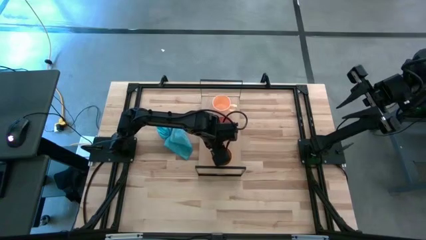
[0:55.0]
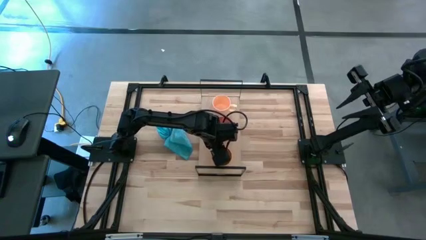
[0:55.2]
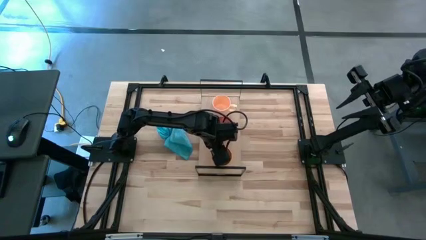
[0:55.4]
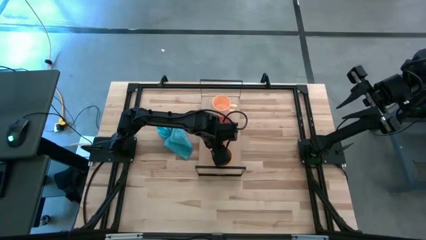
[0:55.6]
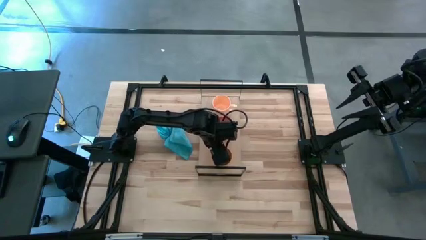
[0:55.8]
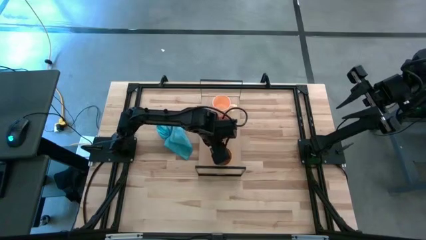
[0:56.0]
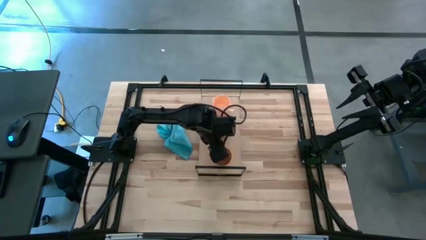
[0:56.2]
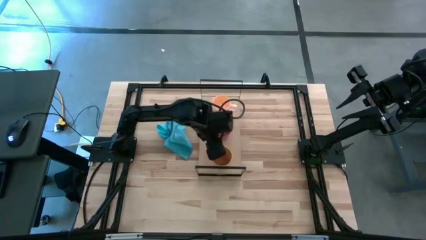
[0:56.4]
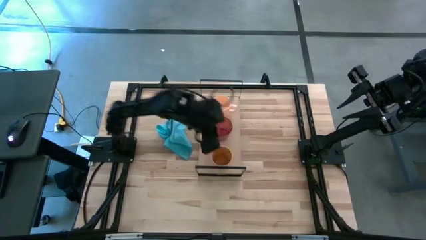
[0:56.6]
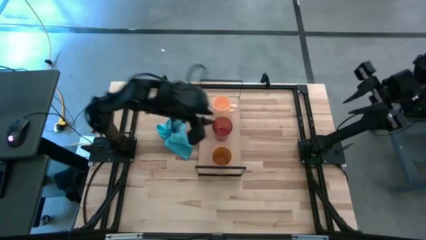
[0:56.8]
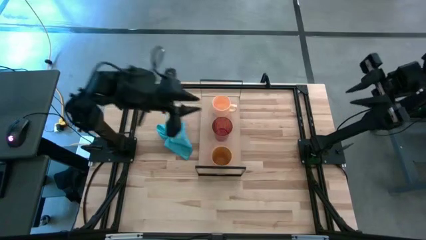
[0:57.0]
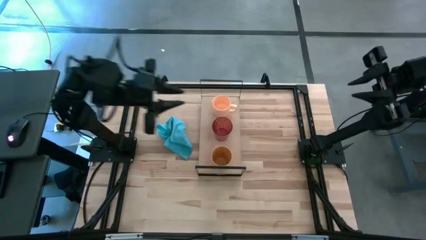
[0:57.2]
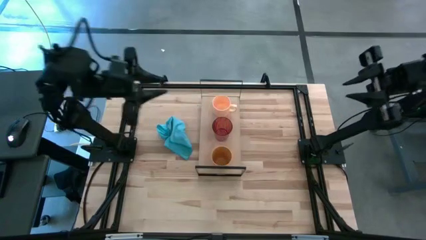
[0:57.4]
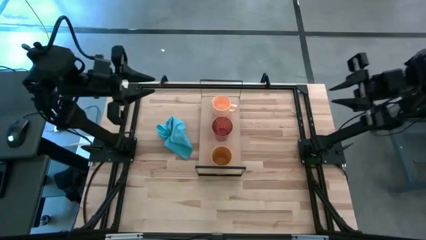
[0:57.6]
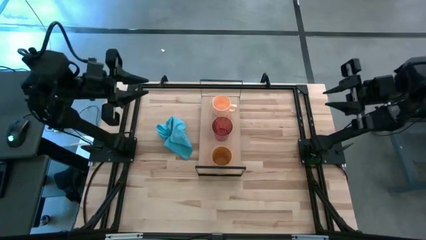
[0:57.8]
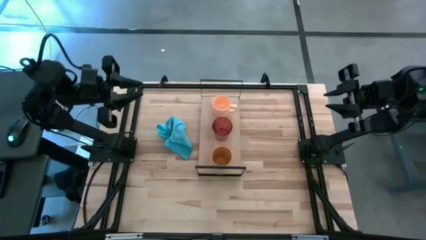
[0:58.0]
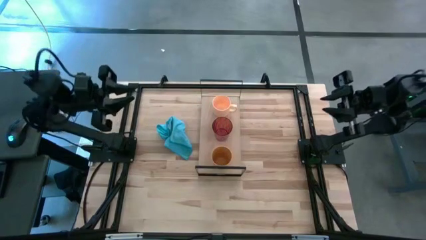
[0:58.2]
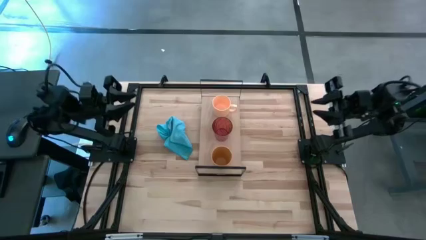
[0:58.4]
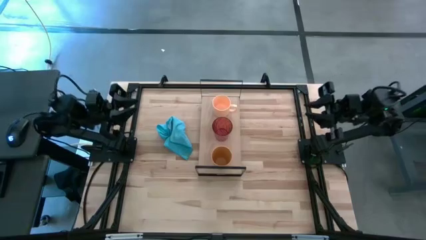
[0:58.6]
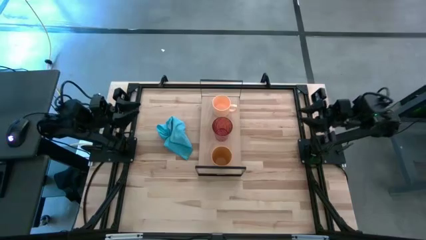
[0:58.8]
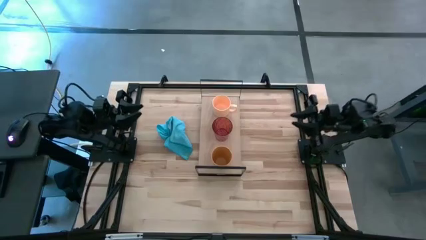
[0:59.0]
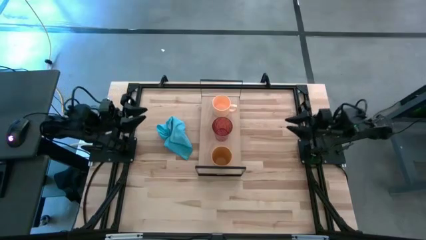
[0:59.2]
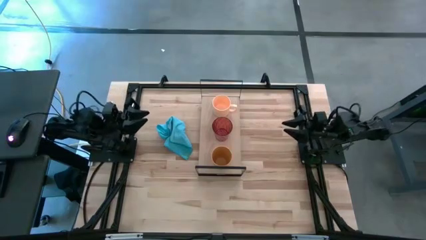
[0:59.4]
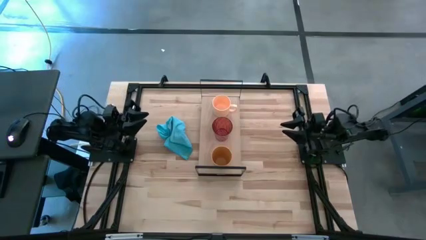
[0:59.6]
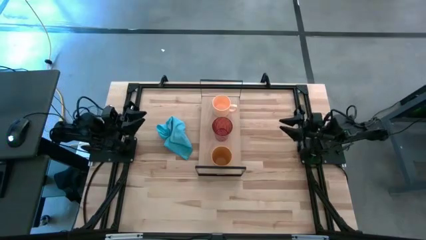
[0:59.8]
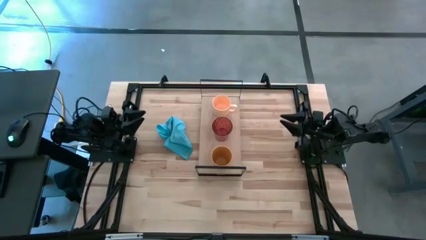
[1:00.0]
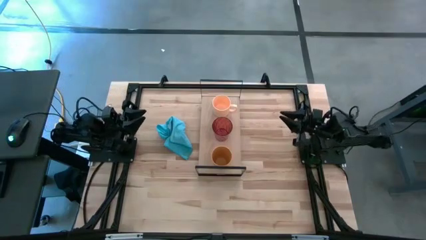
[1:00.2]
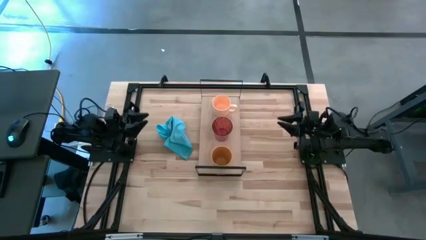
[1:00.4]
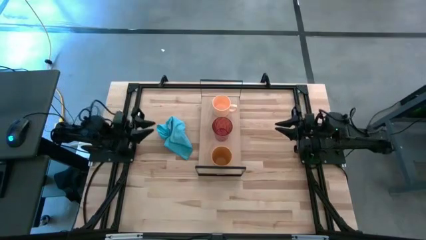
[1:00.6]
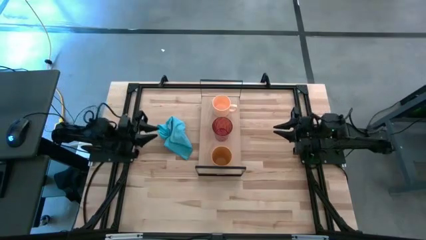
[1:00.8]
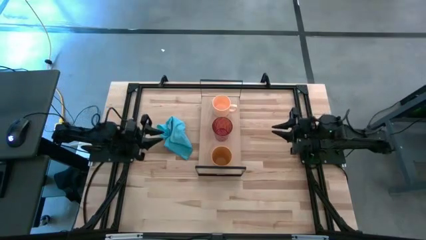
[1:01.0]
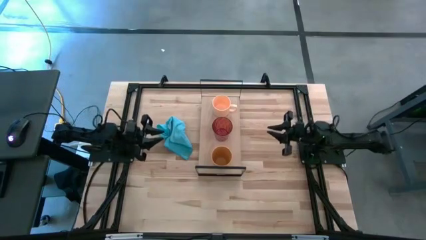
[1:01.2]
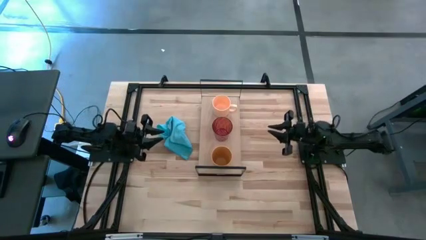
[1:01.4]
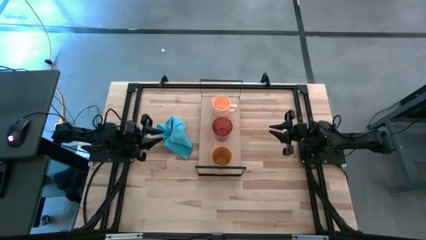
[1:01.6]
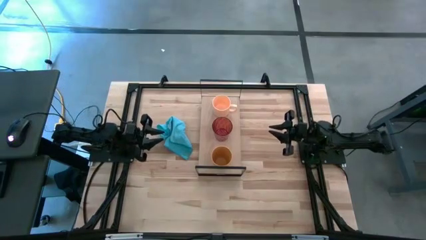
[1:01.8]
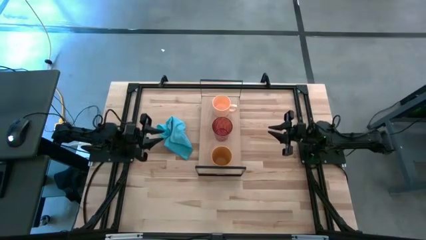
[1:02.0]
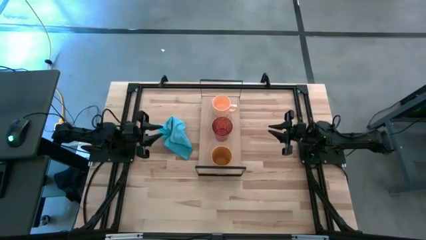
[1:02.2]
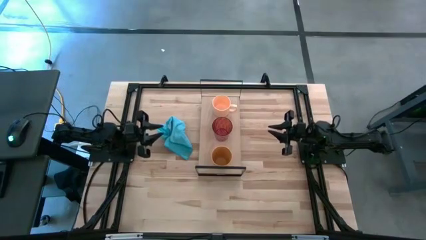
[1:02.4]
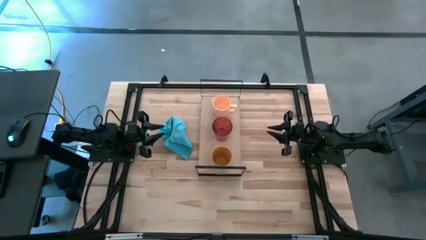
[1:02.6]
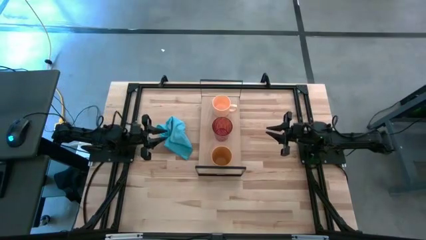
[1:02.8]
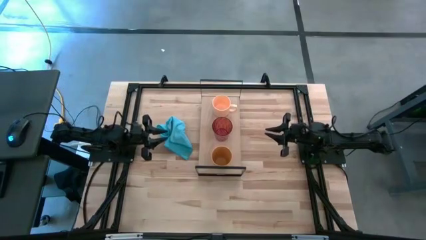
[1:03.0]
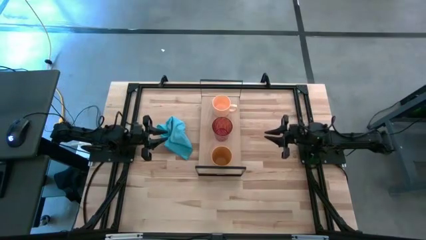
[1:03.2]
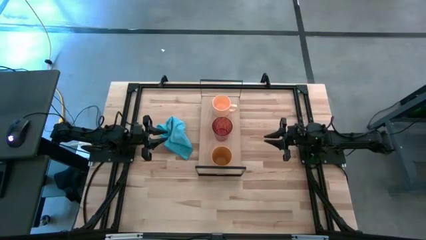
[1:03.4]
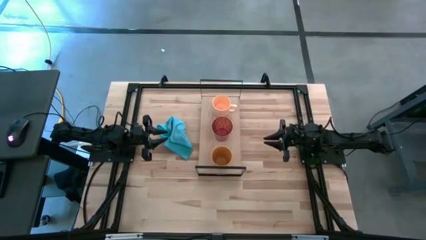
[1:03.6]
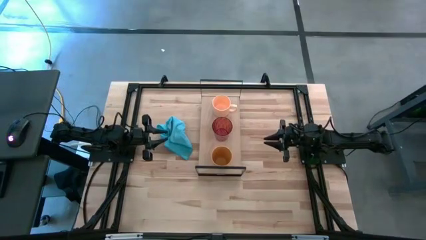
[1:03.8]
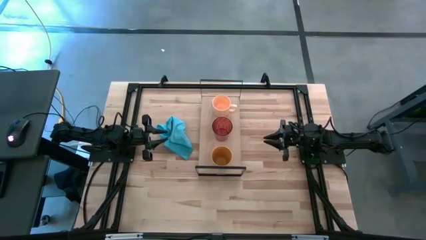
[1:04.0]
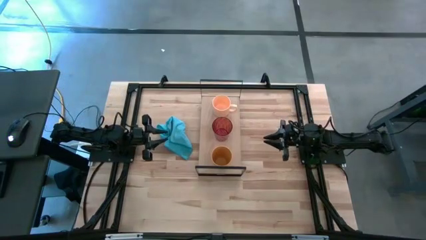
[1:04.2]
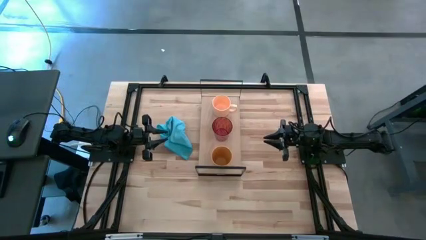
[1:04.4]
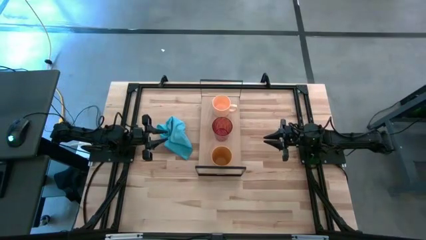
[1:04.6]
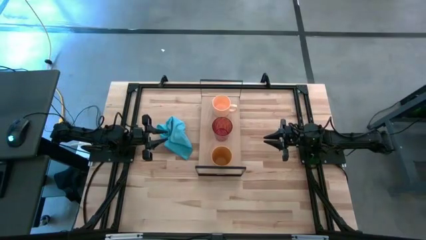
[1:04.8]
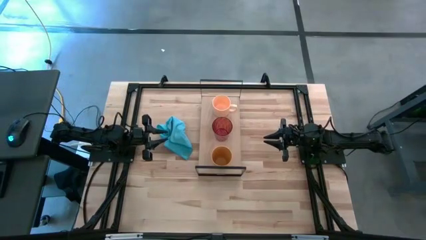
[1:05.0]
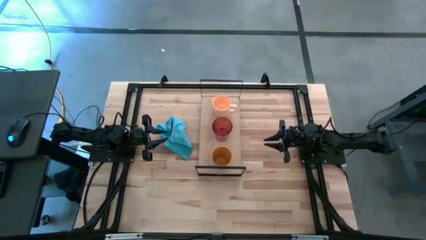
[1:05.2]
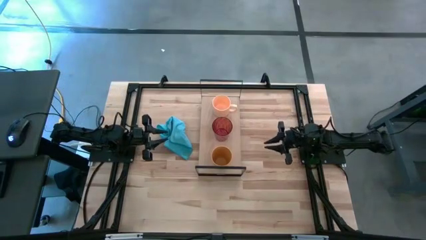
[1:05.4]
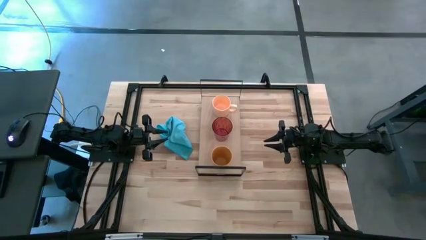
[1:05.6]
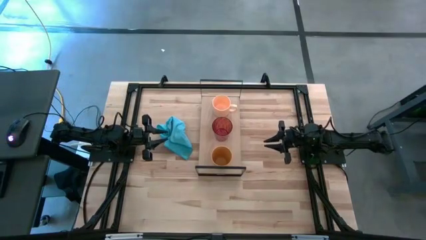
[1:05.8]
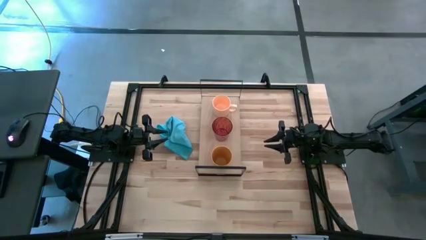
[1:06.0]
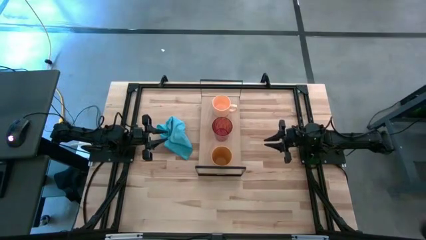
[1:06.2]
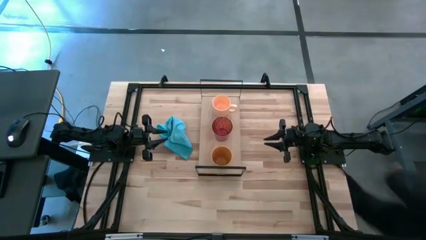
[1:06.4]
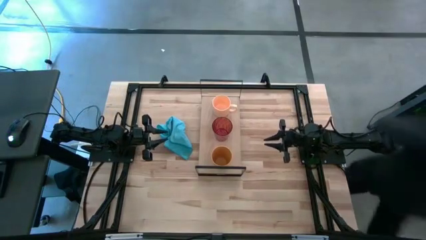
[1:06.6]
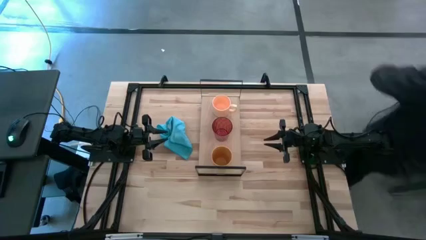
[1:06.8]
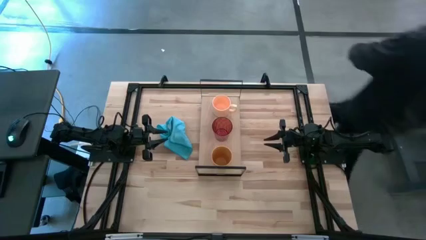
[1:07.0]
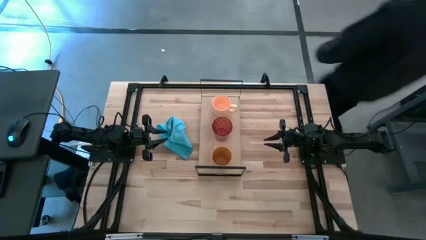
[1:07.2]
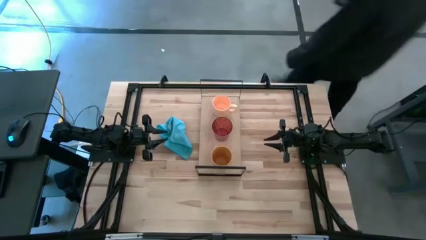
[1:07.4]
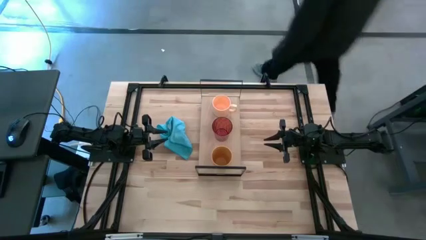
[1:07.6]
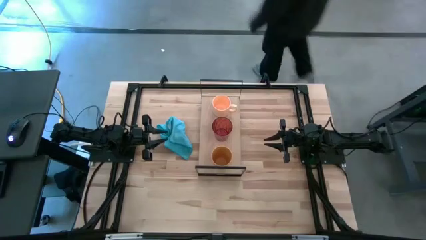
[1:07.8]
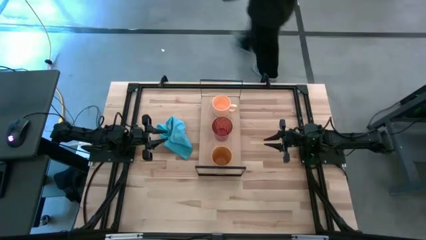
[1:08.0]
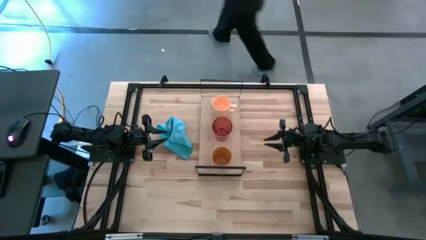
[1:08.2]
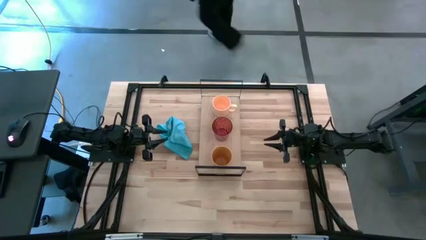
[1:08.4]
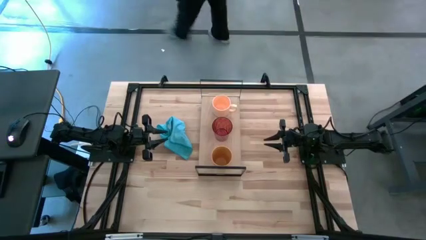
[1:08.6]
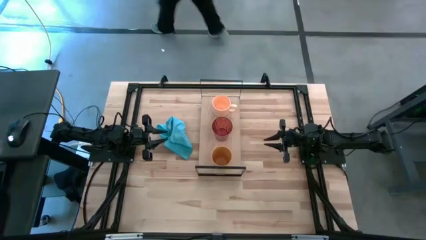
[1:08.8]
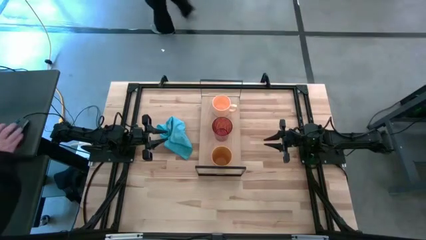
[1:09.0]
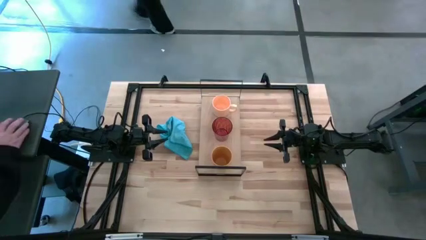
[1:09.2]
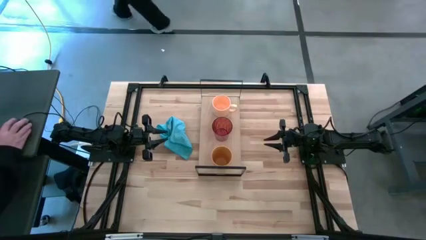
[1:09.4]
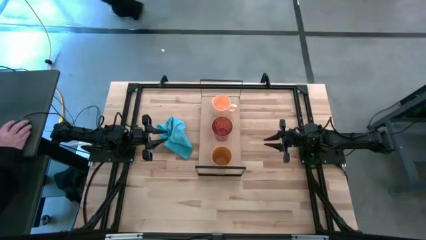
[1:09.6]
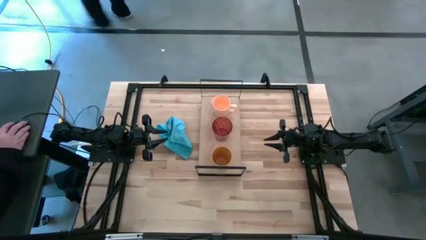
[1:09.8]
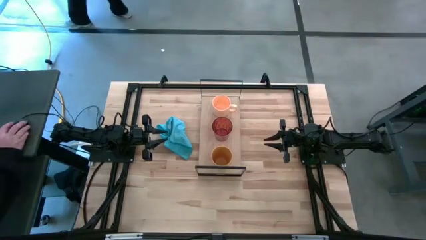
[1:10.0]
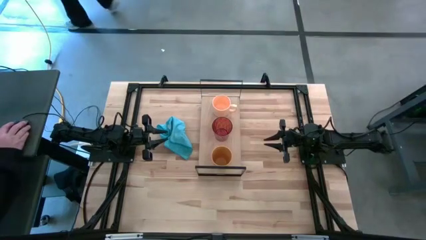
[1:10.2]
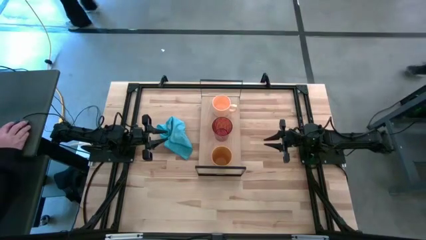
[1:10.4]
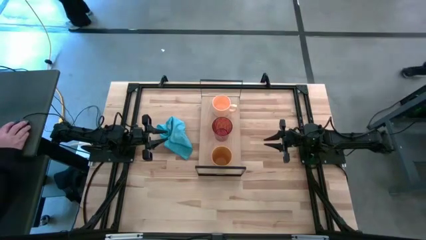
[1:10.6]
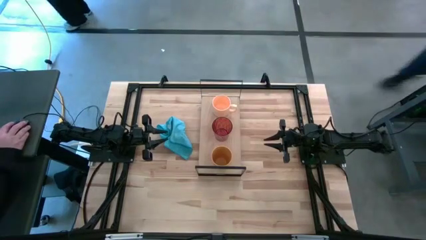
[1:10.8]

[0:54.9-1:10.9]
Task: Stack small to large cups/mugs on shelf
Return to Home Position
